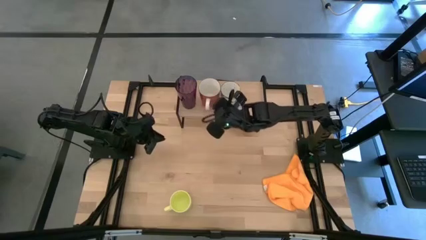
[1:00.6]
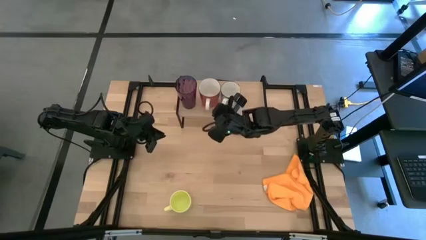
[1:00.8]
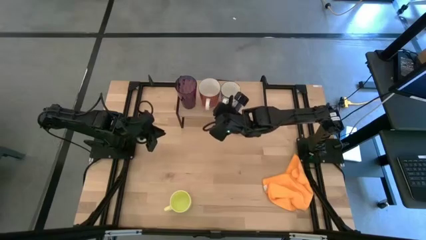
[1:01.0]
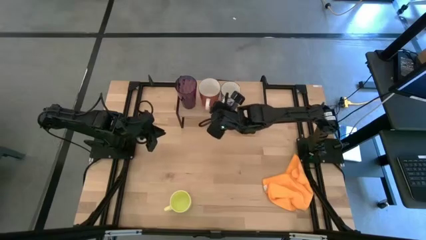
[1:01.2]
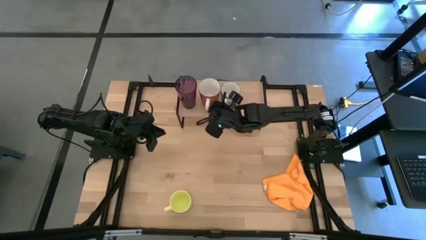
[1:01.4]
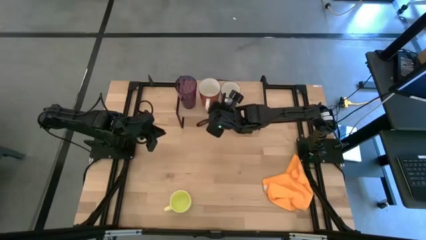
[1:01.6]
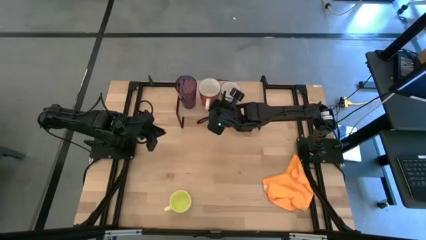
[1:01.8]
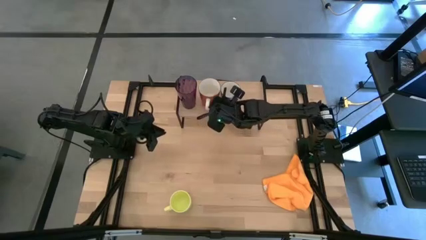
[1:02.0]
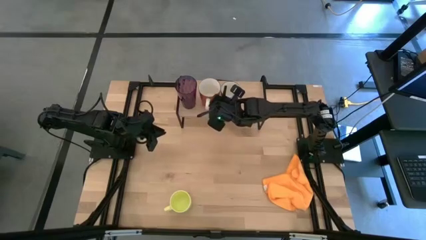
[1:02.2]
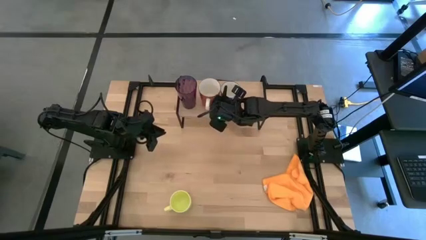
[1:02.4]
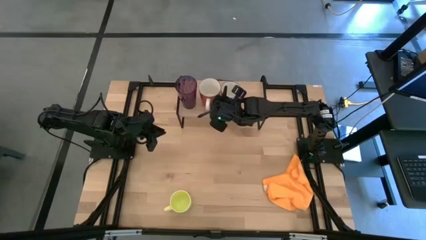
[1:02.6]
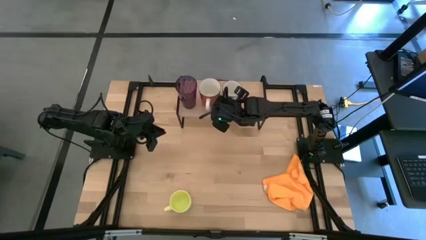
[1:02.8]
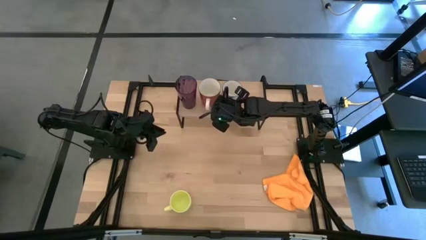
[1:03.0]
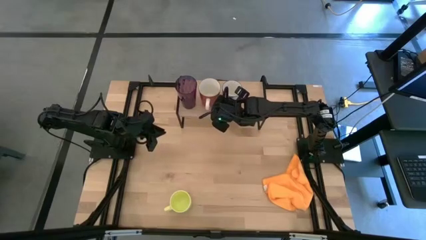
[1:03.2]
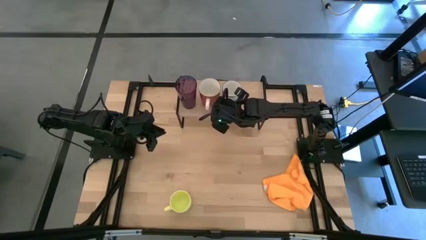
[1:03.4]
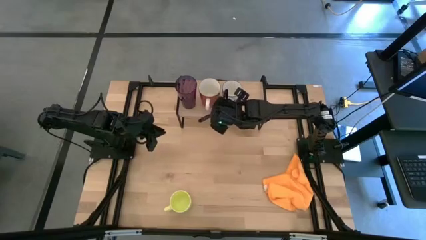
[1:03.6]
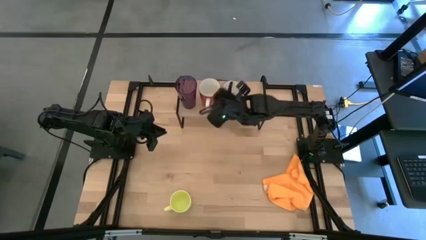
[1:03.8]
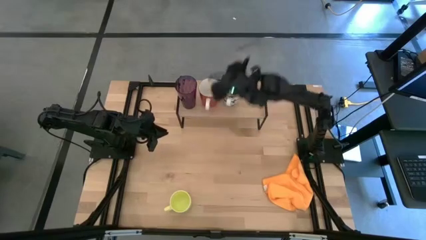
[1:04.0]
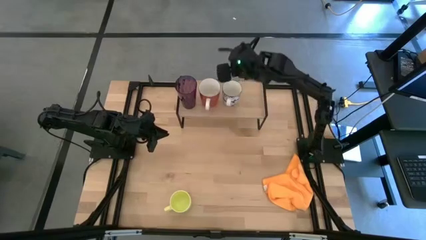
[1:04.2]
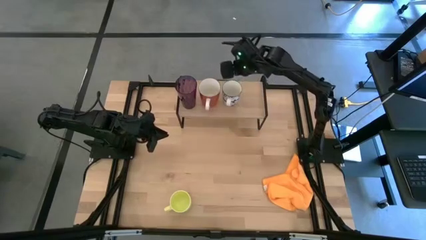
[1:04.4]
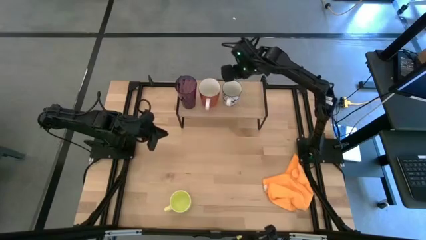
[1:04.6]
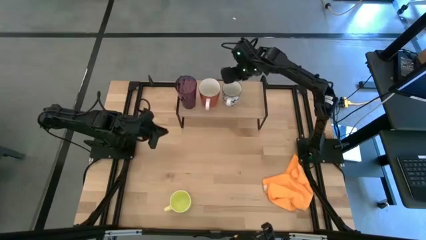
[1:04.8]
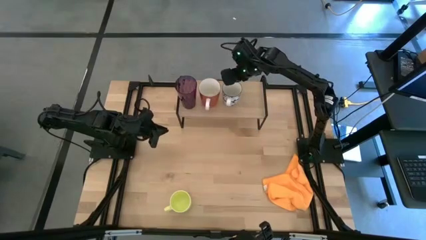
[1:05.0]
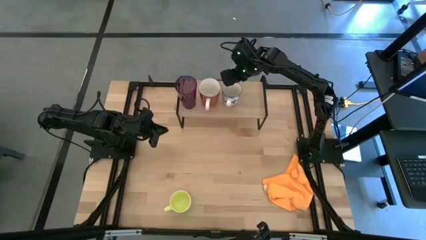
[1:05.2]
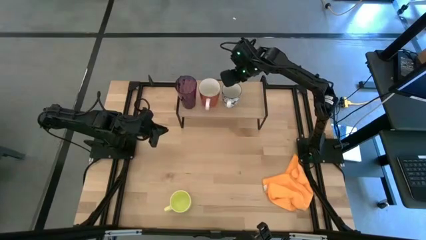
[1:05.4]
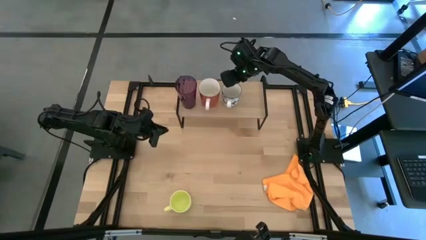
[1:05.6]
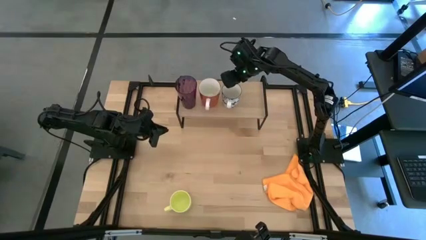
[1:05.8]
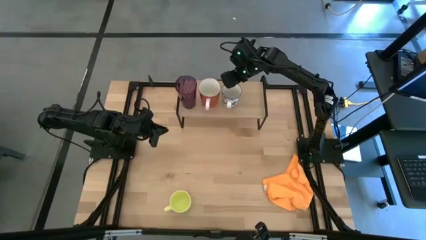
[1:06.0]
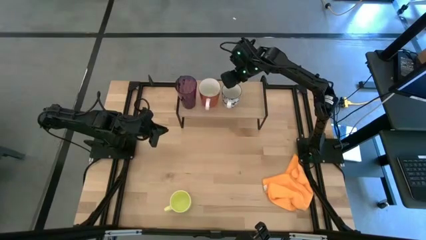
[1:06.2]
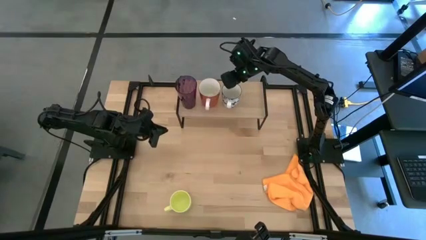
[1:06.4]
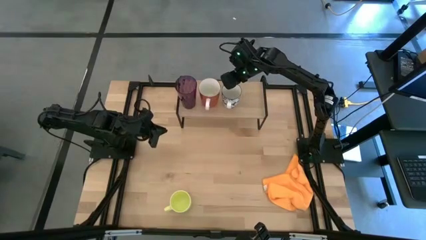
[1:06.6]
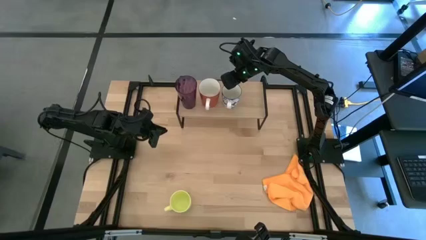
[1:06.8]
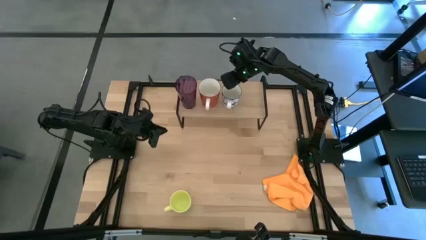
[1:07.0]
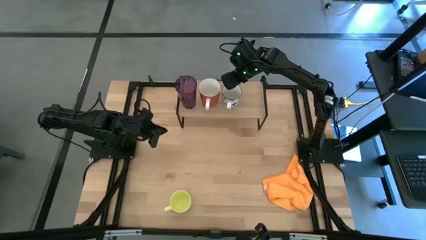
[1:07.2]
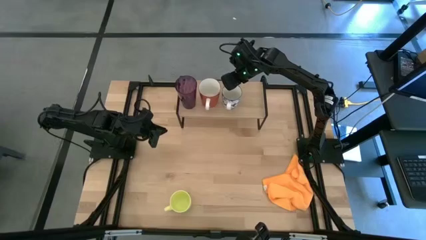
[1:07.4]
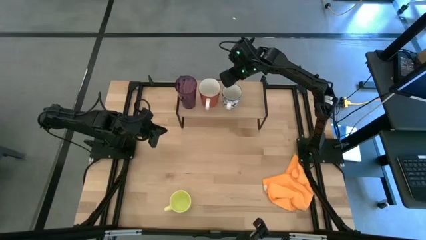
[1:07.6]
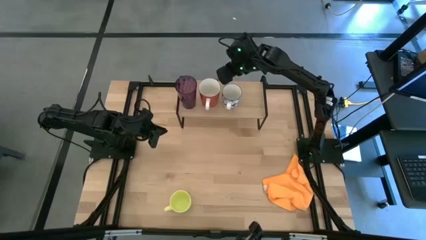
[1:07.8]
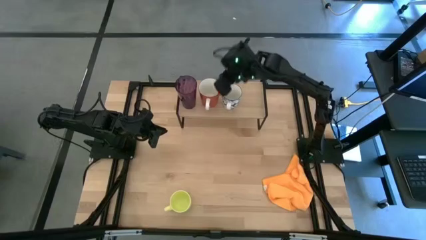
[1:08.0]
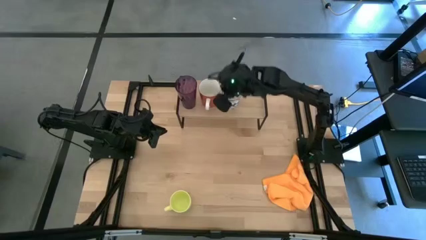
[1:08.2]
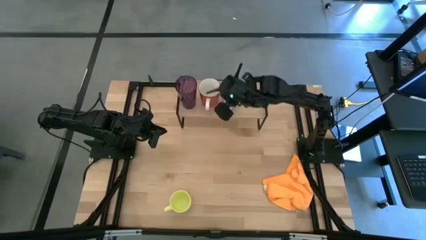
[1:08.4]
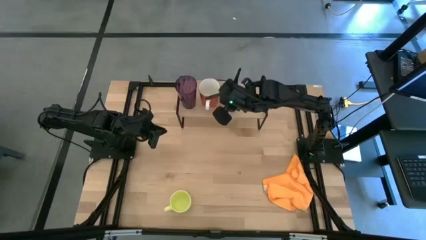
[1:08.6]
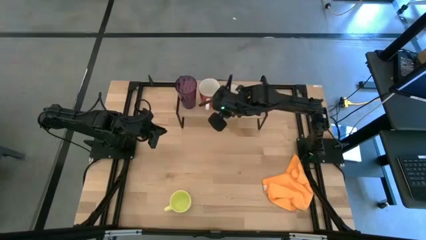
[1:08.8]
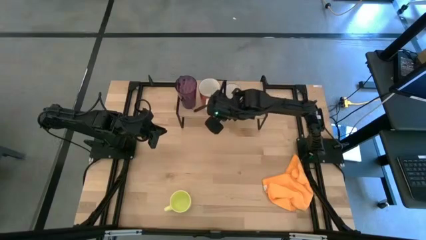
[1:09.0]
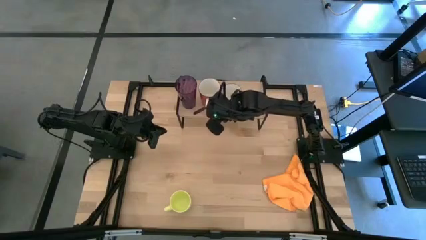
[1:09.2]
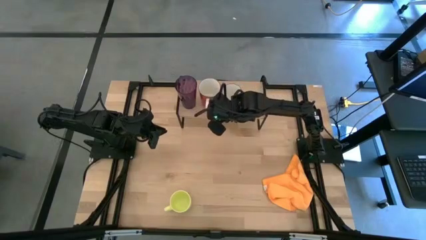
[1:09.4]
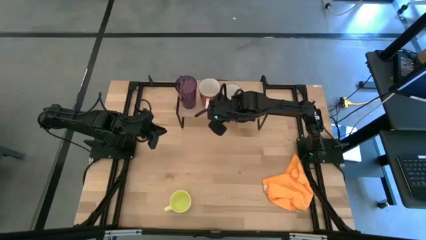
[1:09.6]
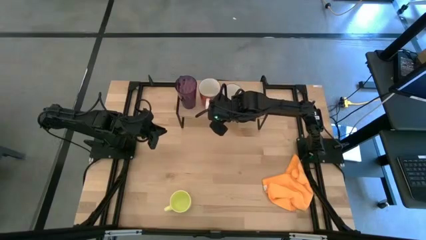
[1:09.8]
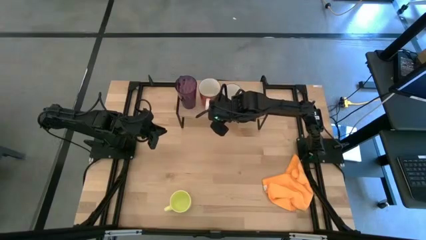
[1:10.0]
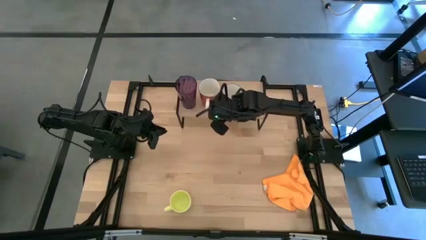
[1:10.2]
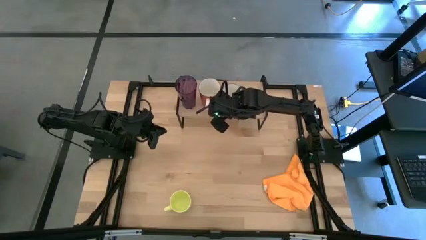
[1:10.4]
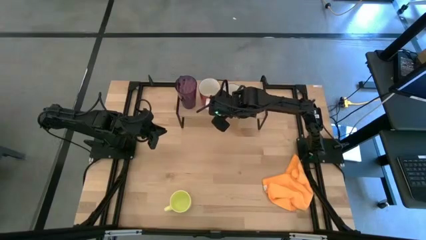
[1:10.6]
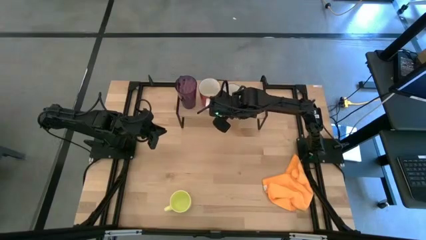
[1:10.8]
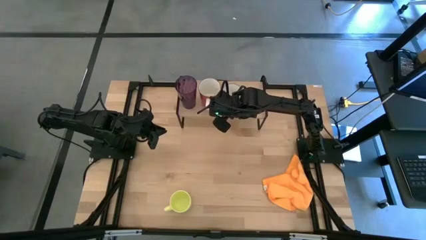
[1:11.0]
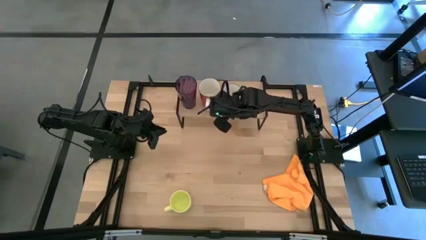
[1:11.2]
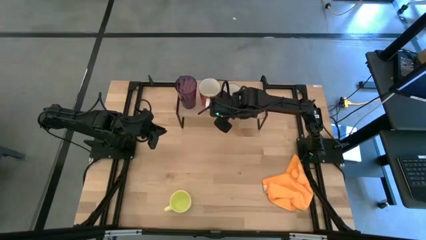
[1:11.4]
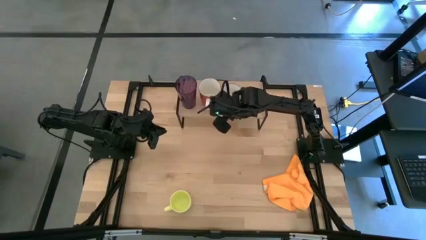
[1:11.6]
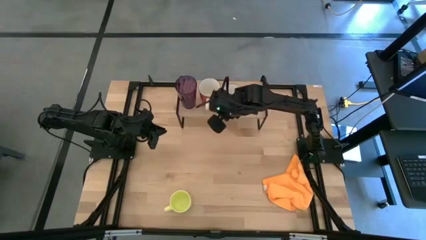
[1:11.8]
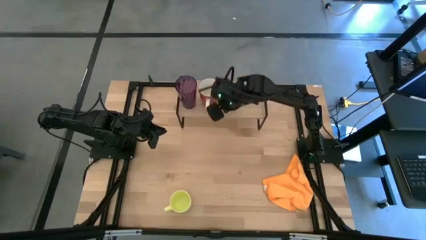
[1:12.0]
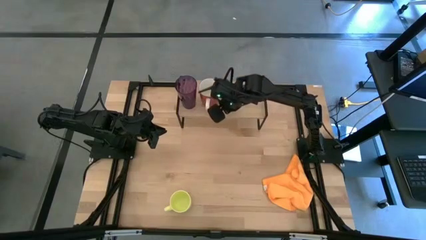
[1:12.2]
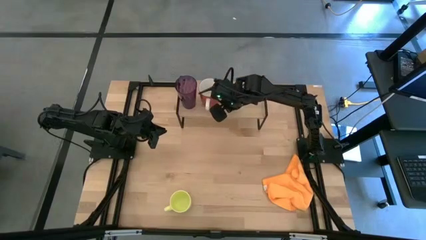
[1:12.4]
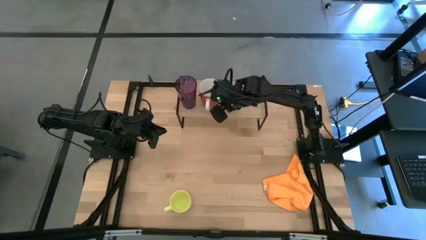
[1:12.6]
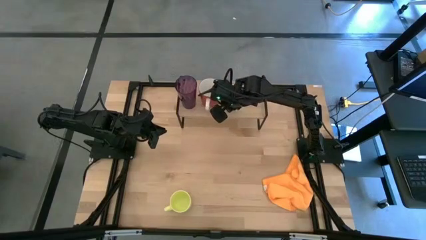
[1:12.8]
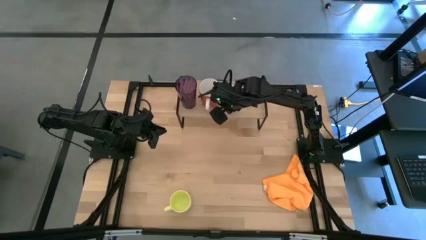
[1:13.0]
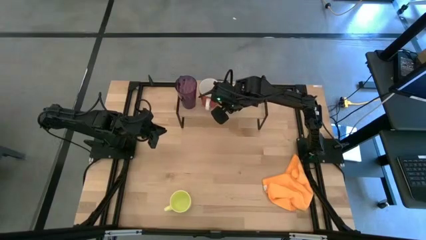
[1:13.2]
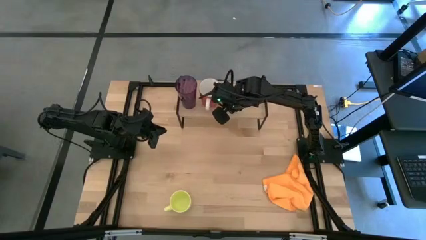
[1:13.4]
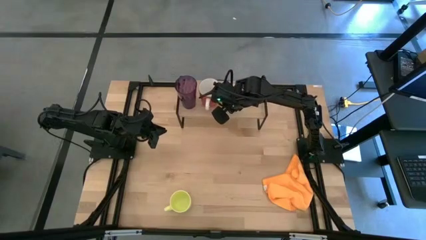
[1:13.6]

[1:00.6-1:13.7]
Task: Stack small to large cups/mugs on shelf
Put the blue mug on the shelf
